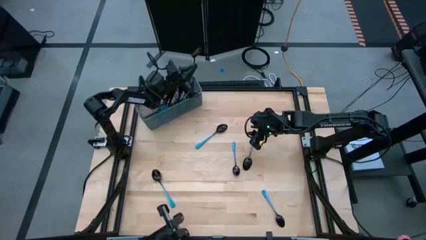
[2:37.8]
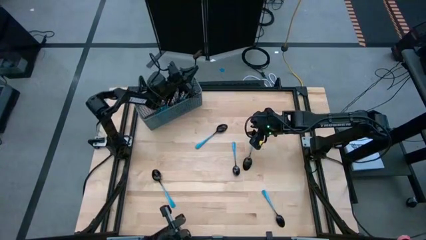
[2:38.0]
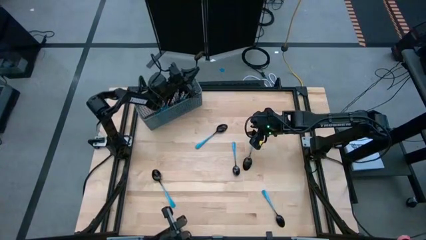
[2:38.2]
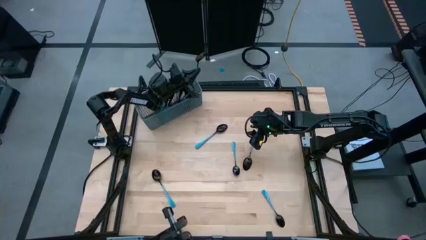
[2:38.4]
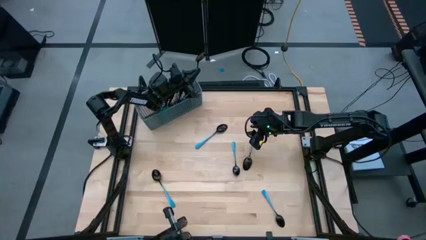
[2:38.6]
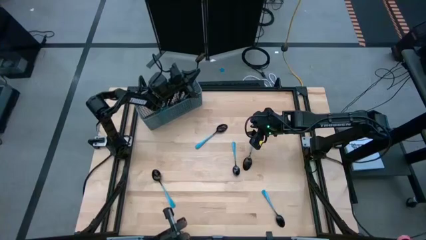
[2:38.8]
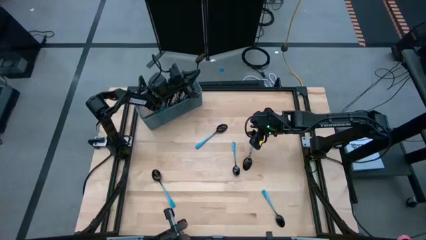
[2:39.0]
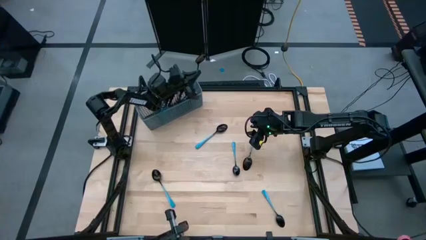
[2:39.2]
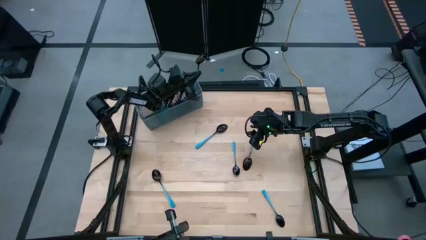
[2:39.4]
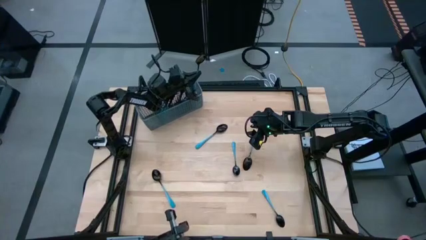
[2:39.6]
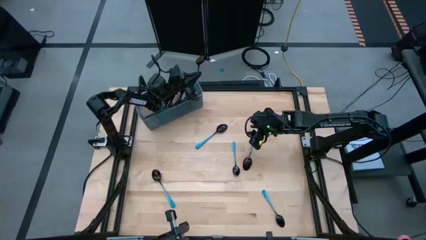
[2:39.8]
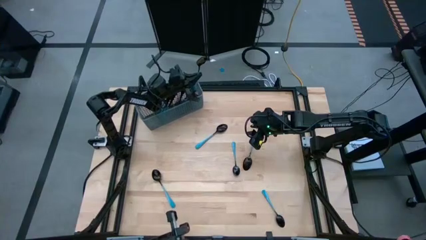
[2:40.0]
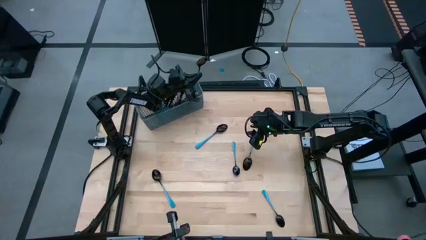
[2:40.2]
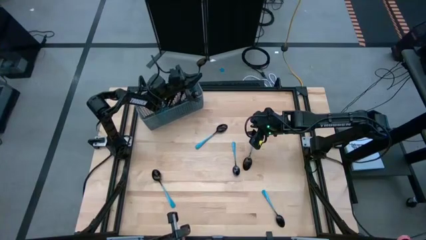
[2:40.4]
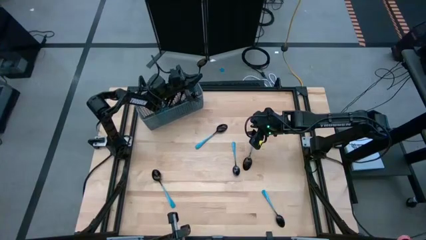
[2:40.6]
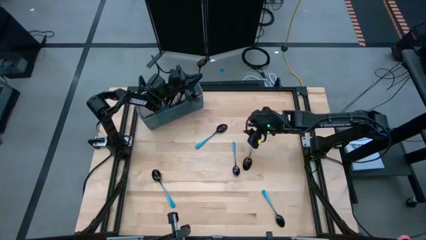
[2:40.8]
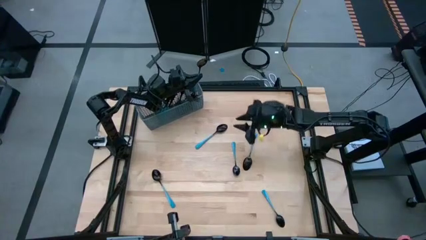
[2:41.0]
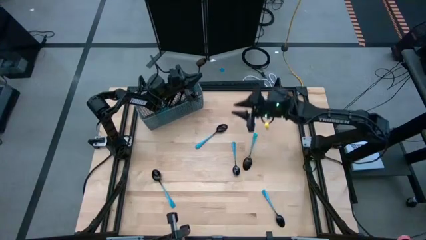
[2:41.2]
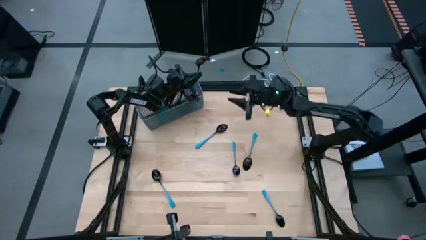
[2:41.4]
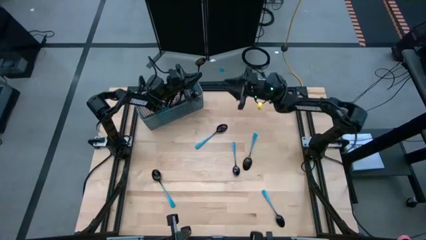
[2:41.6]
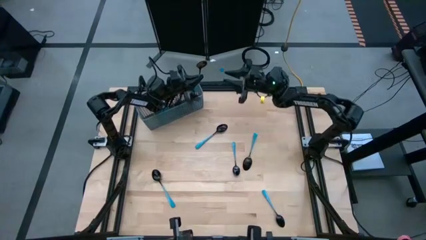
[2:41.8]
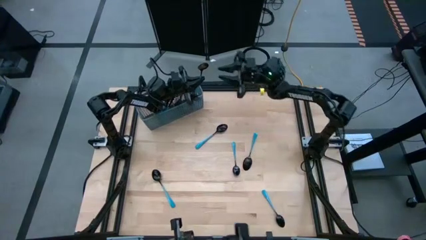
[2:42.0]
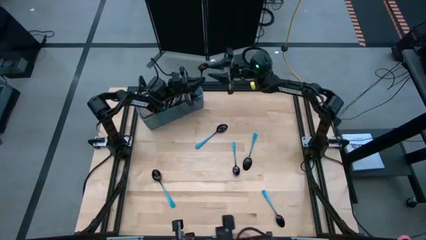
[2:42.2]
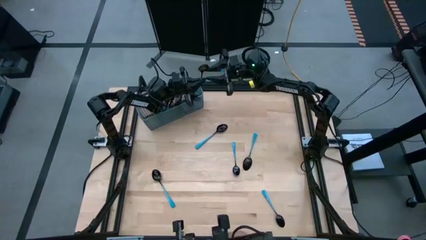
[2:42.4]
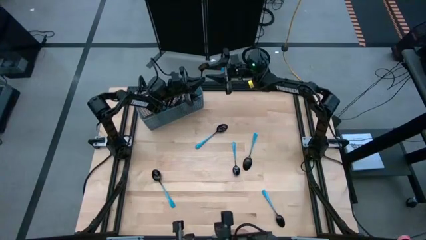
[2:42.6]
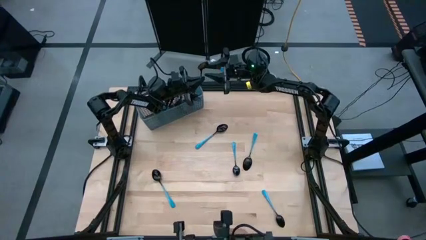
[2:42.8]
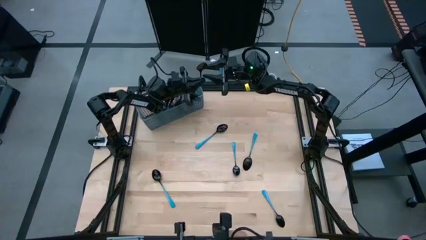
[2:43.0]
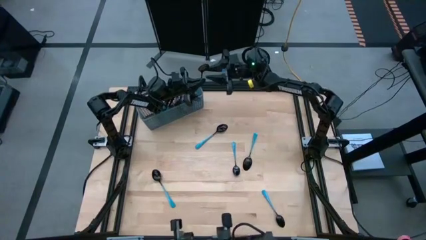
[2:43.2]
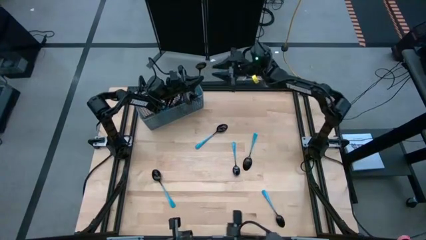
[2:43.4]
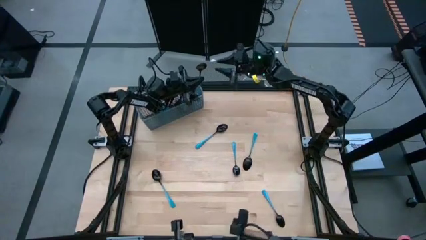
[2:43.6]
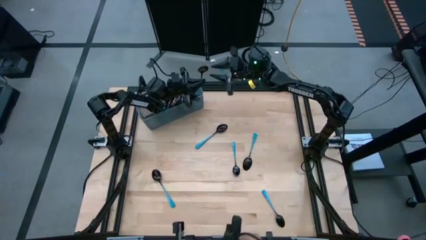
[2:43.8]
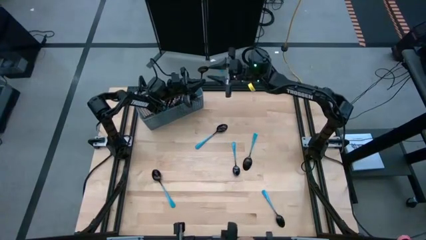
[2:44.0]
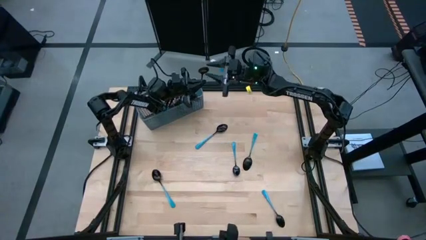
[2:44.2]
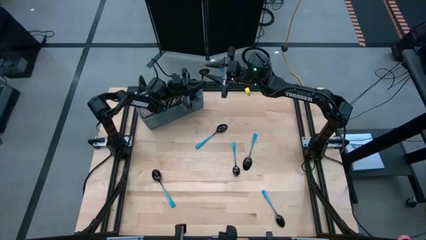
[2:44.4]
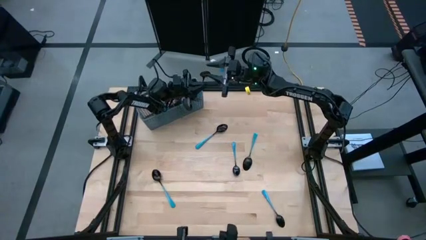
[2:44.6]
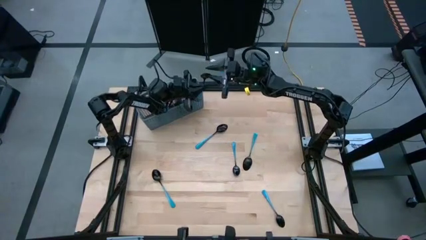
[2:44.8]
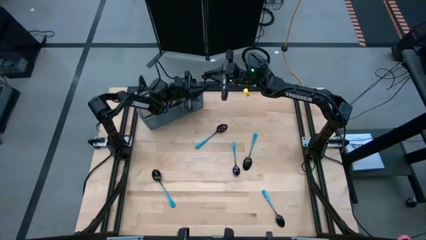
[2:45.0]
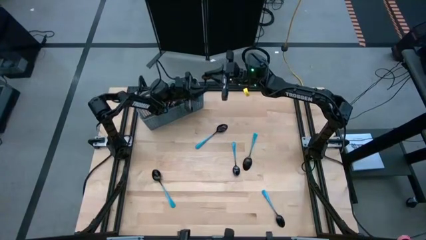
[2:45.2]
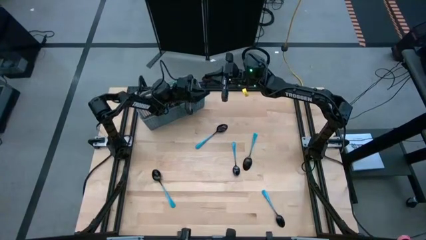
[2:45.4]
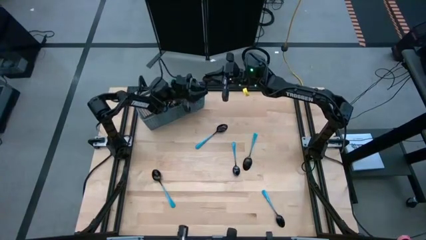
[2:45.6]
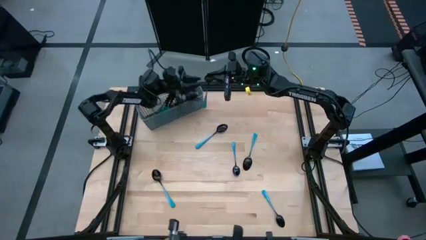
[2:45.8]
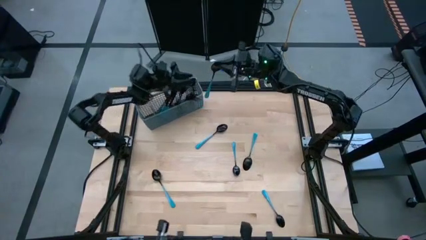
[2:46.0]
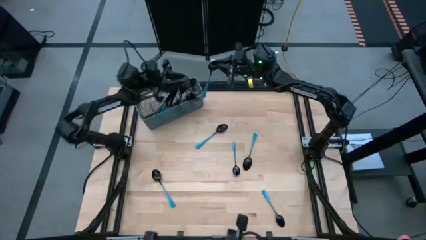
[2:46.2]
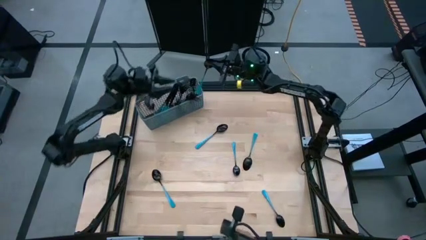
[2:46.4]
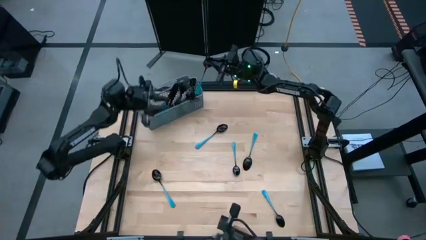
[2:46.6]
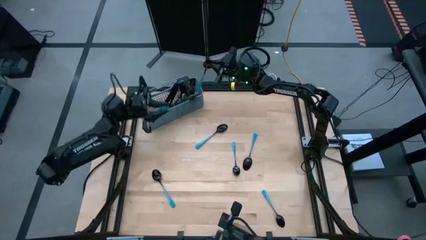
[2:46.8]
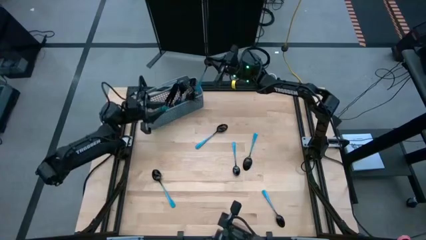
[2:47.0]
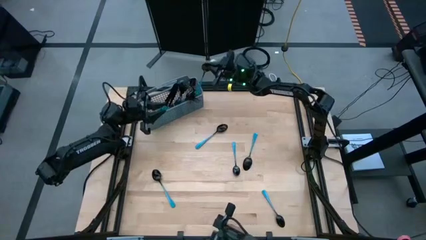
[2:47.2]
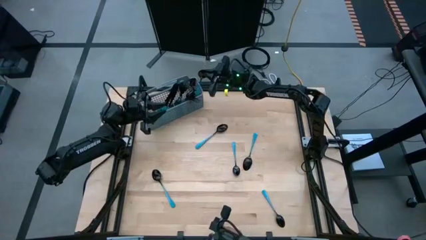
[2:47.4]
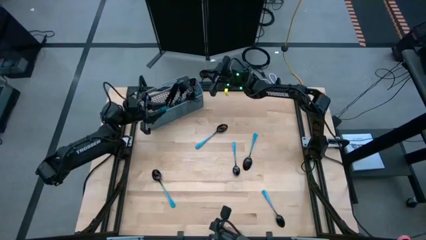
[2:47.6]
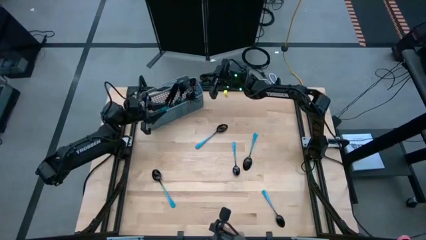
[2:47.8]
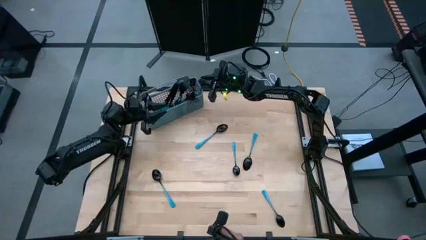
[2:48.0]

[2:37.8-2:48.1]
Task: Sort silverware
Put the blue spoon in the silverware rack

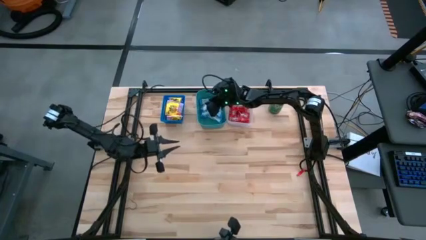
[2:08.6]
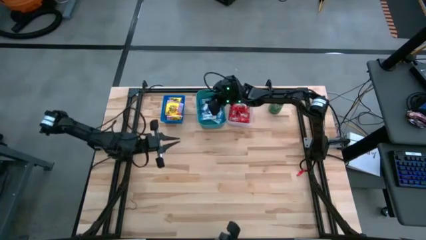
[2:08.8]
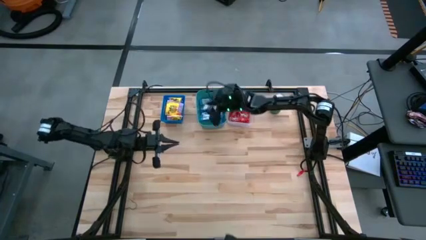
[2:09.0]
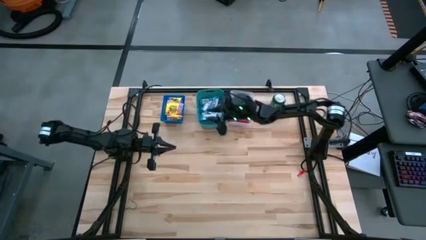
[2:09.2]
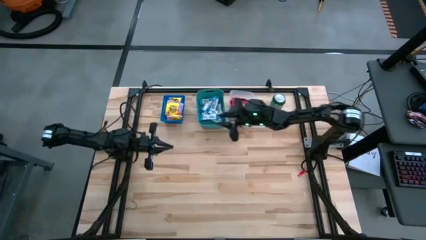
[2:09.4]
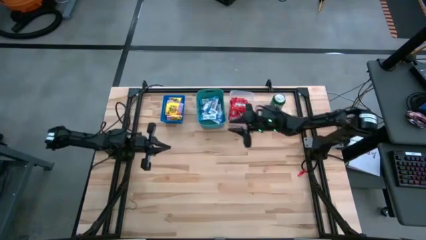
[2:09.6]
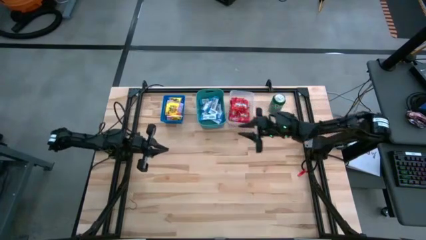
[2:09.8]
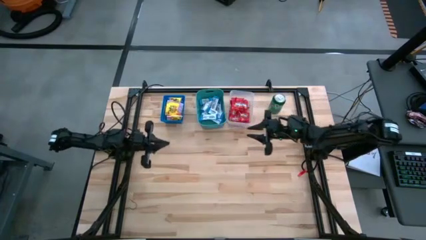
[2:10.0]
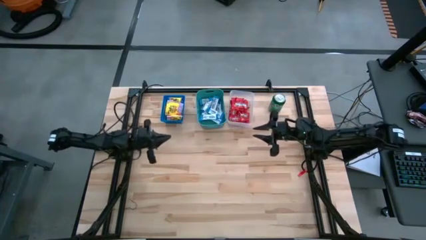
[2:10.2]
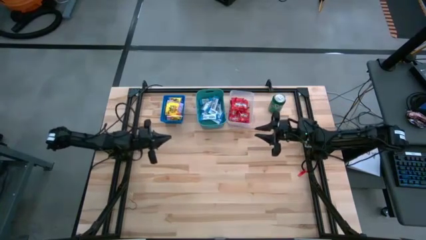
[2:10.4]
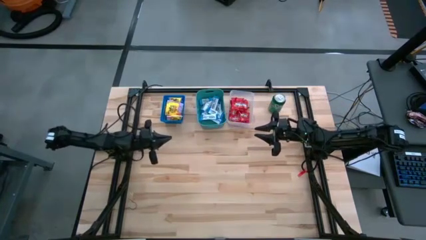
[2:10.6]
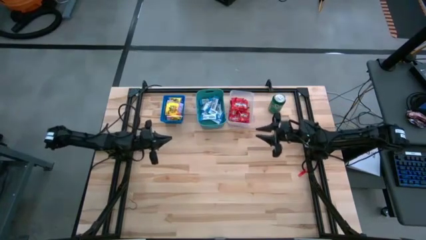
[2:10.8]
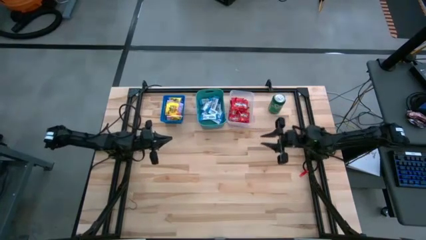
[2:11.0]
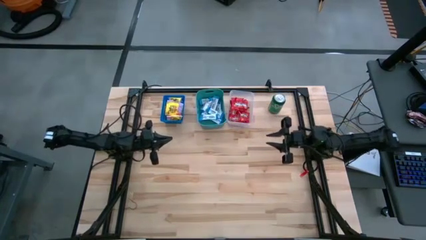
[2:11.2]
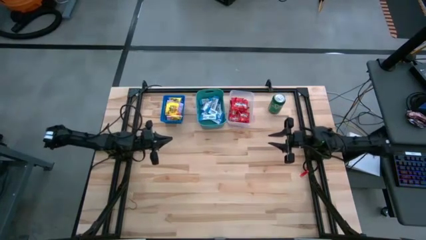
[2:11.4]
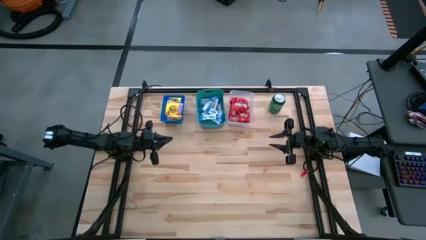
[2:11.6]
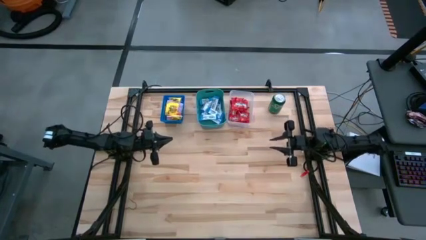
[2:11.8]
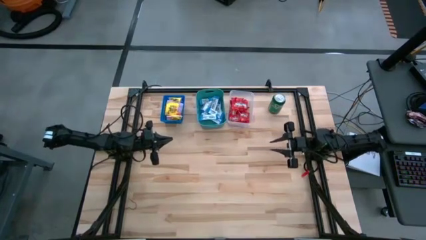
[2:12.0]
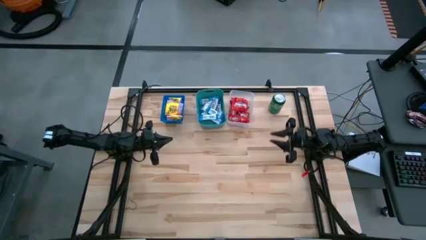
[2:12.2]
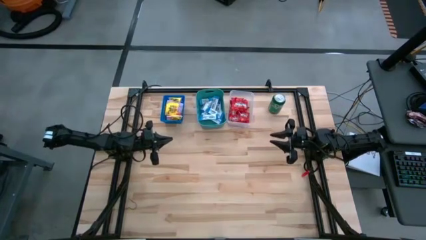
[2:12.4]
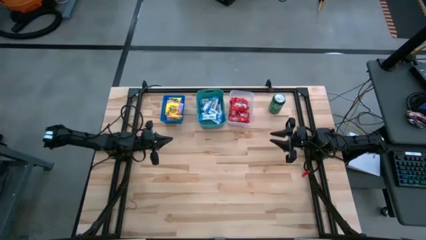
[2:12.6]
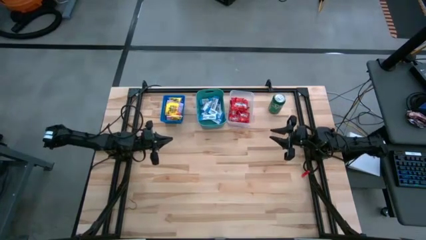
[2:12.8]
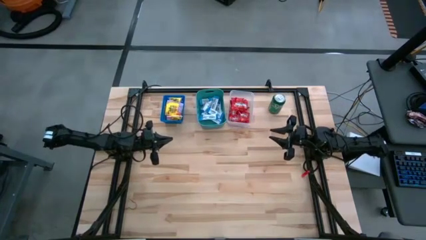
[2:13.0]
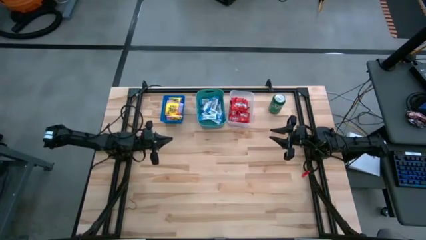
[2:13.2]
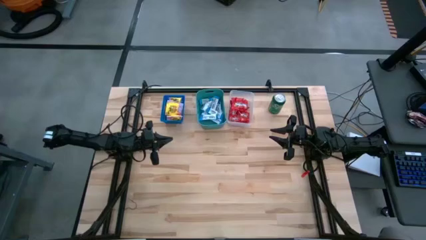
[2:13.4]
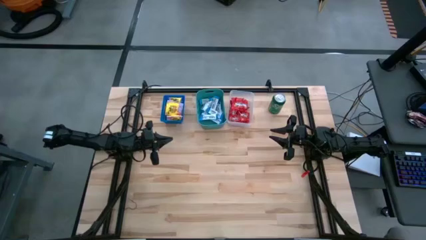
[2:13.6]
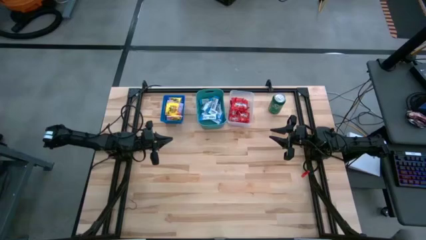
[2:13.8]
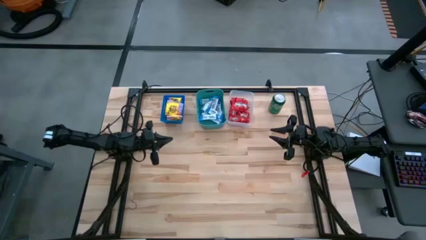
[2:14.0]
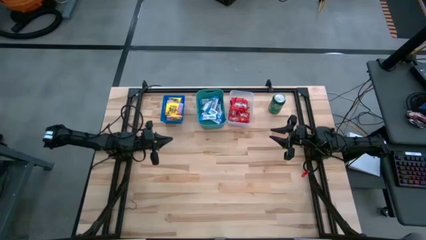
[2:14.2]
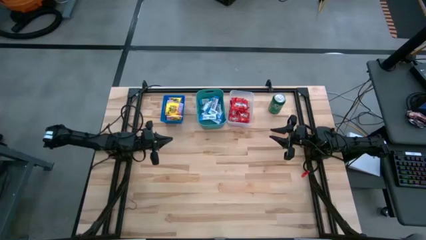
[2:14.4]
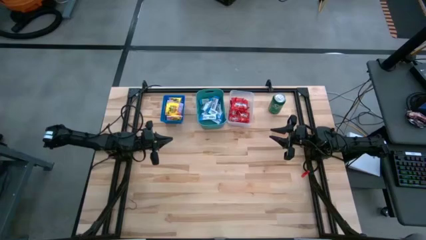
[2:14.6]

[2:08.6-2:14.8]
Task: Sort candy
Return to Home Position
